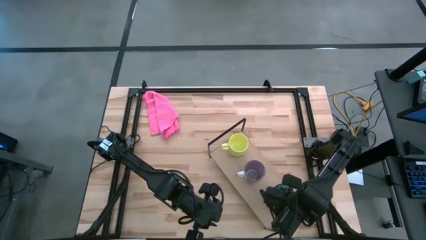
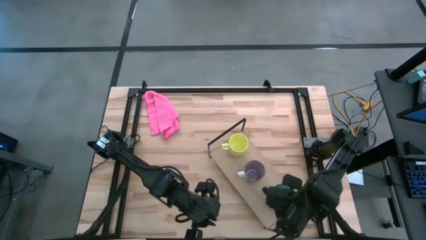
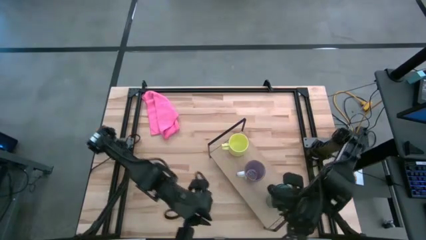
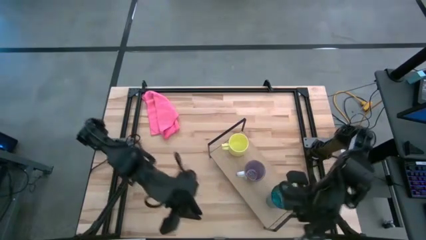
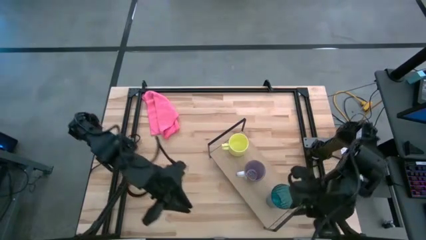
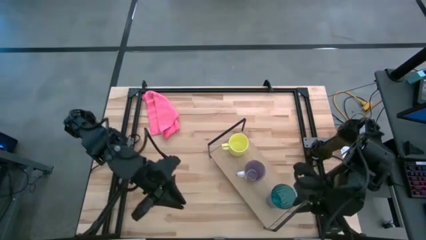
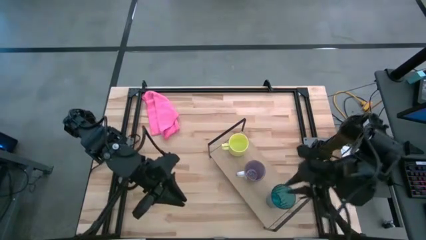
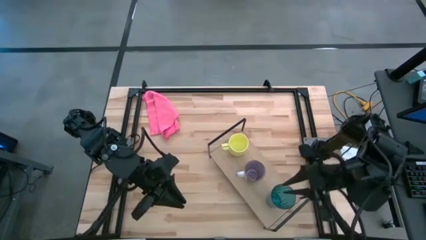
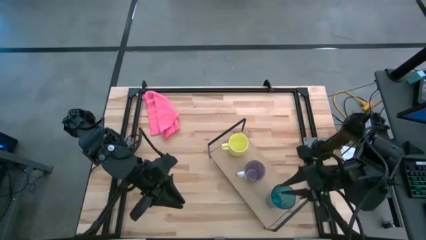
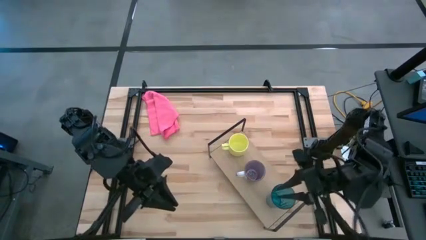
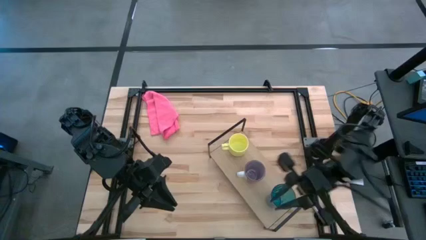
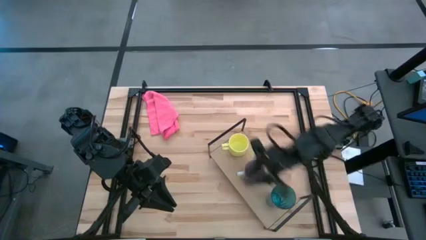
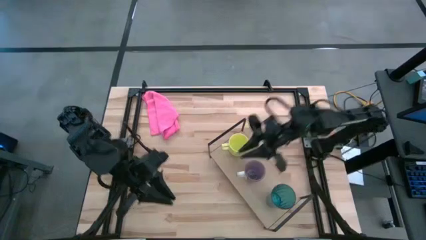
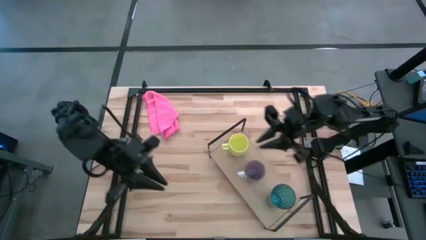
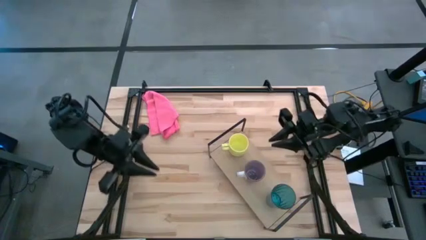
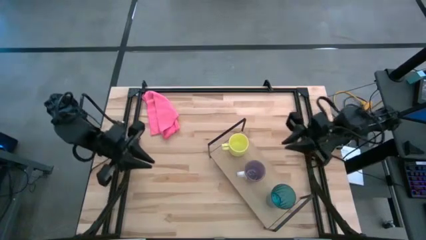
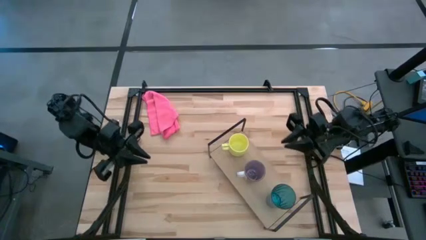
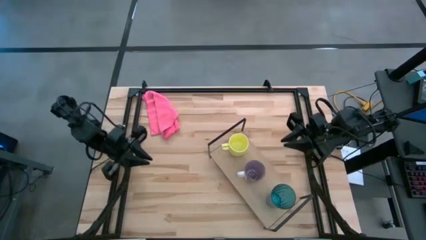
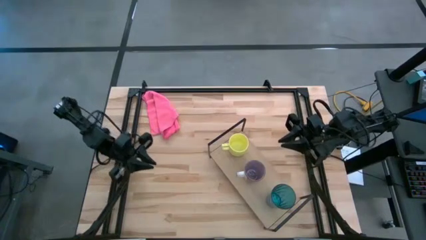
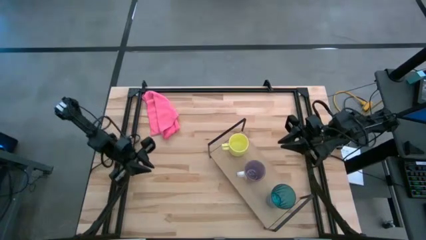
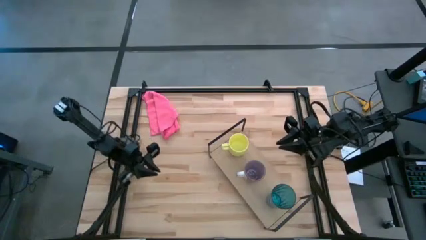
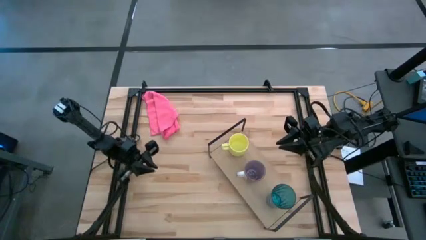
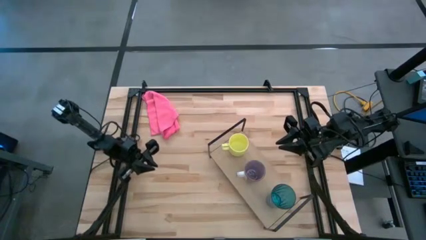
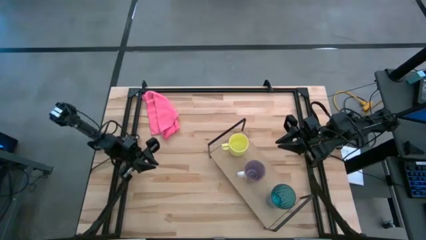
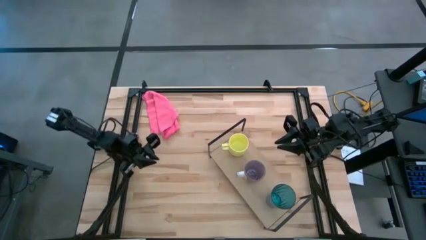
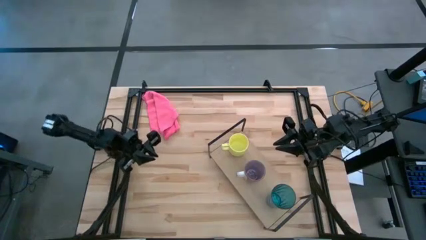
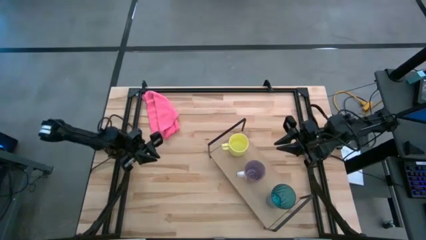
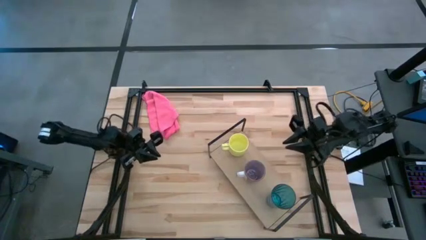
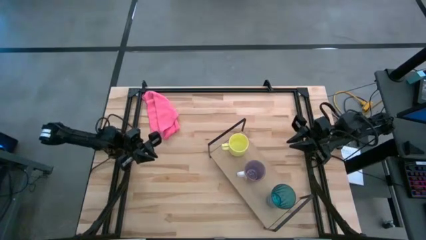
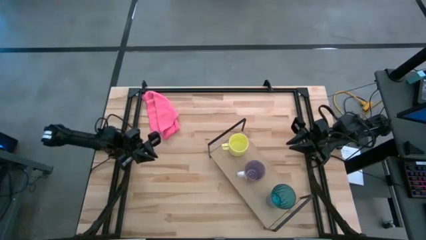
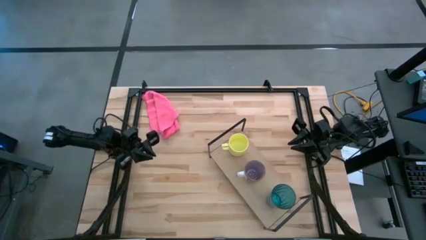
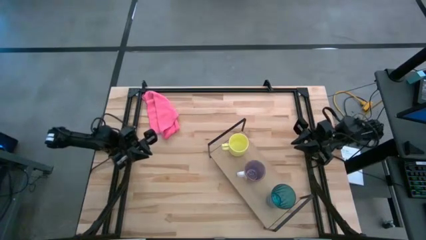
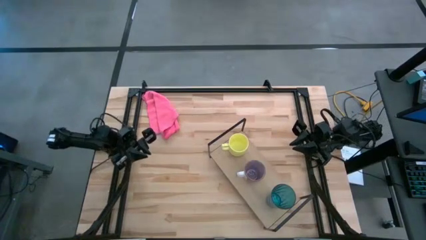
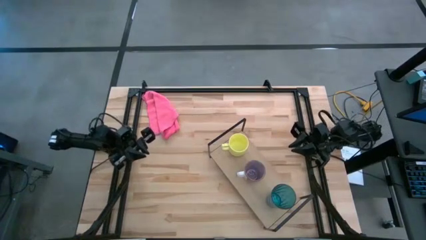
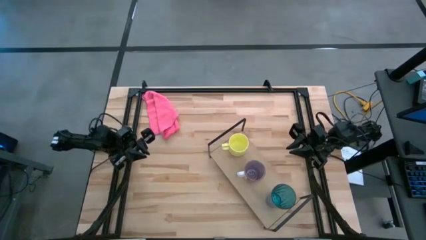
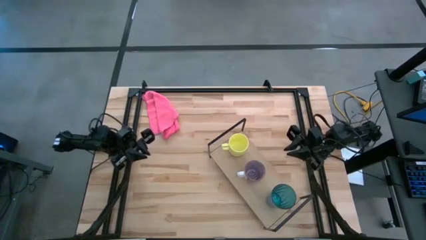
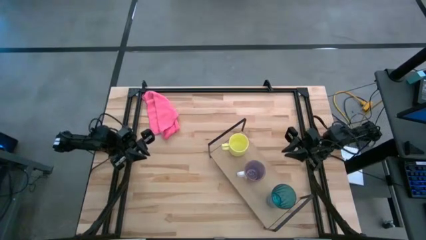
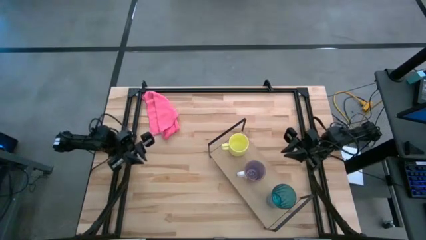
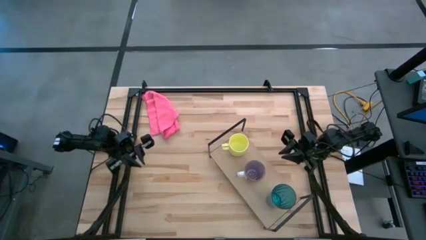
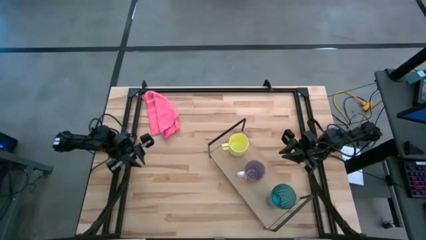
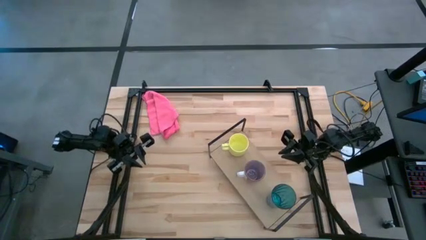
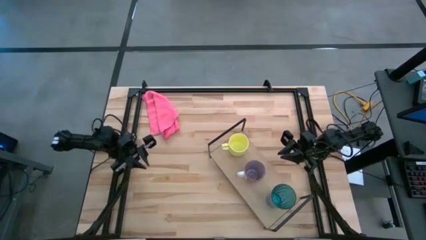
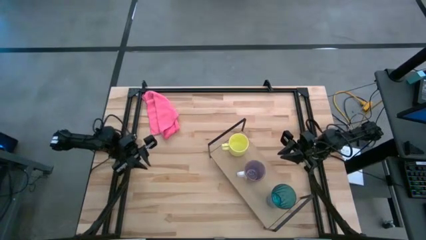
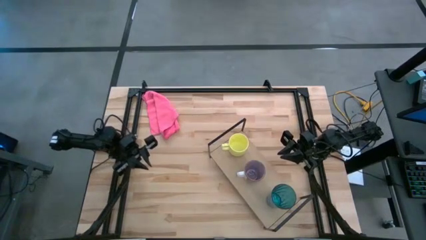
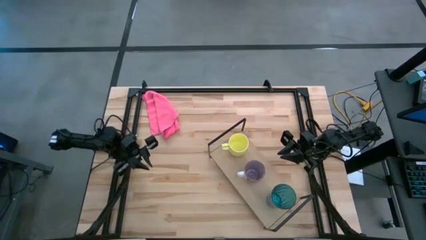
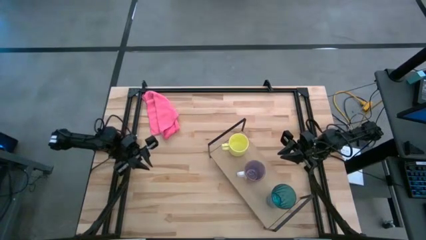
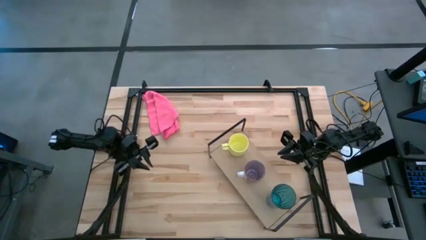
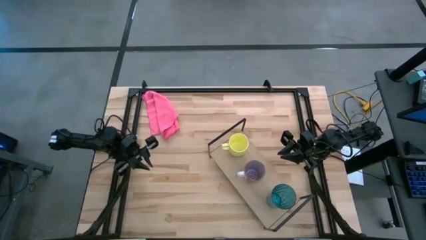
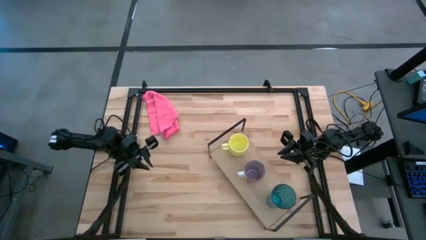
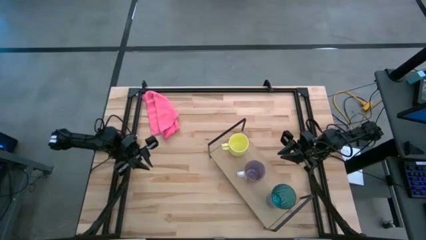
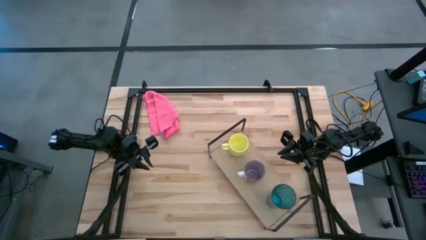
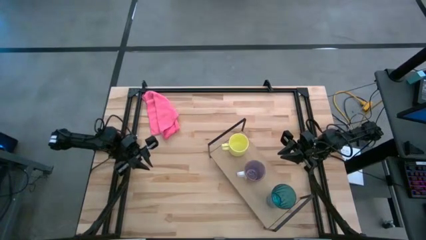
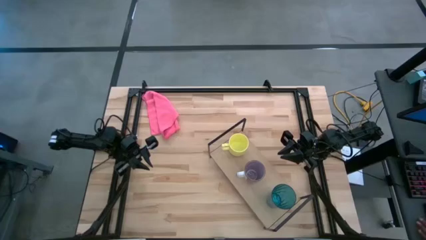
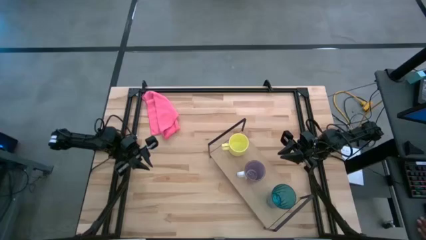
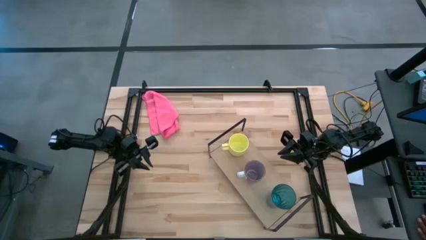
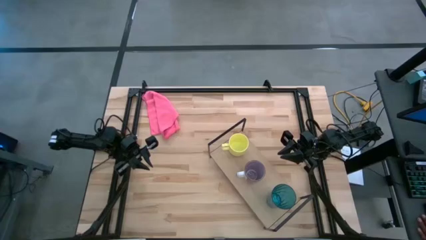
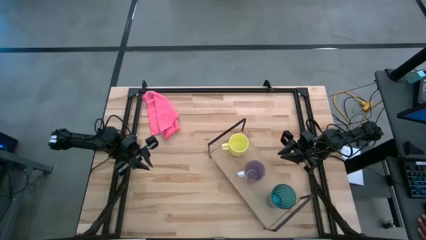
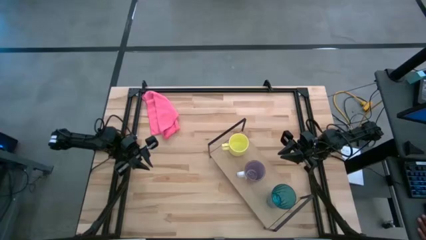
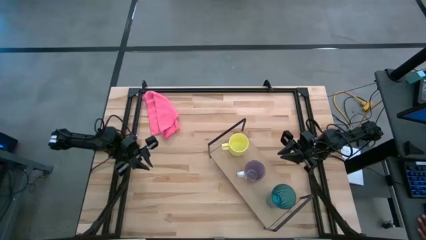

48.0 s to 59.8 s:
Task: Stack small to large cups/mugs on shelf
Return to Home Position

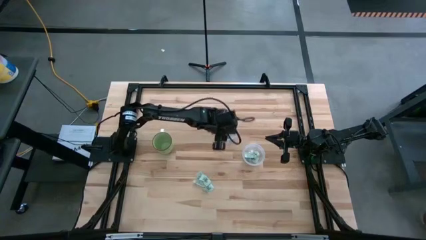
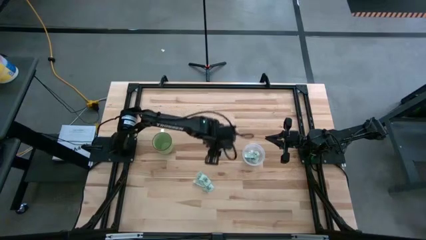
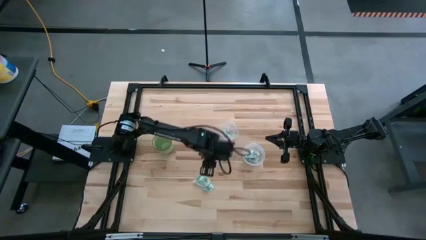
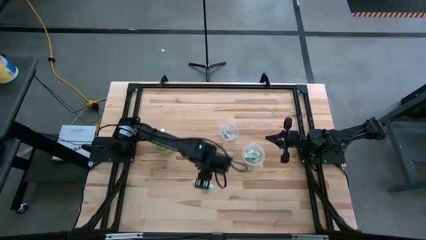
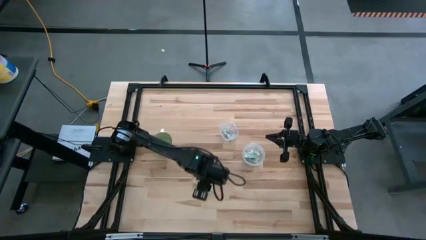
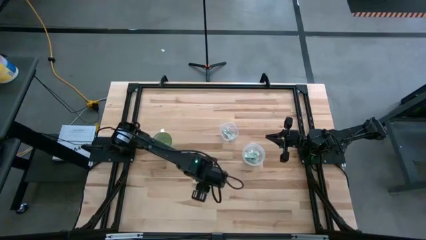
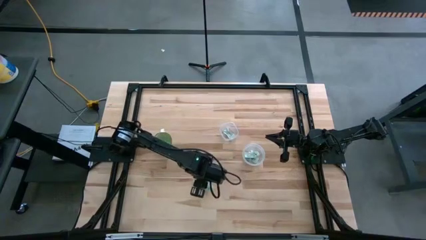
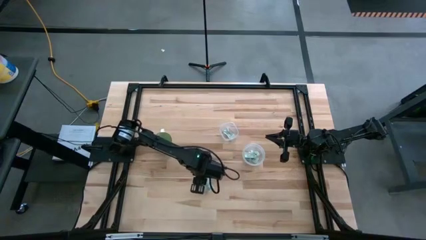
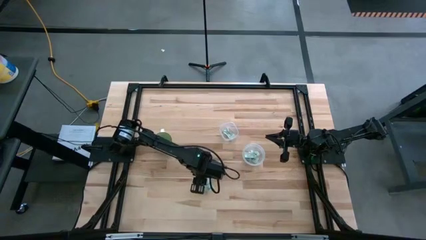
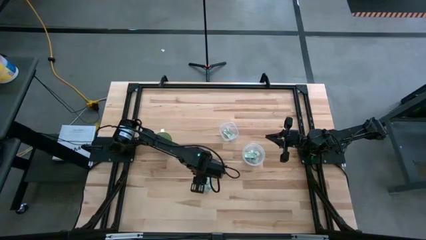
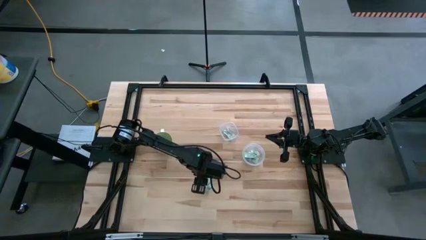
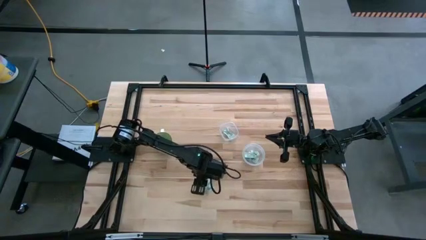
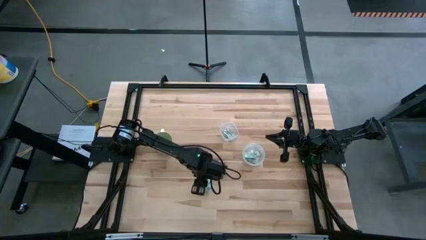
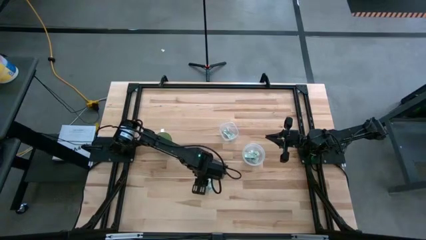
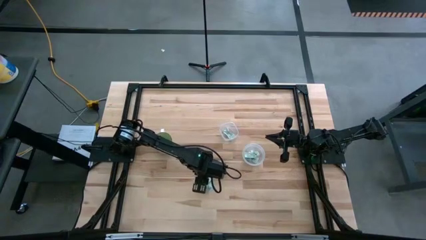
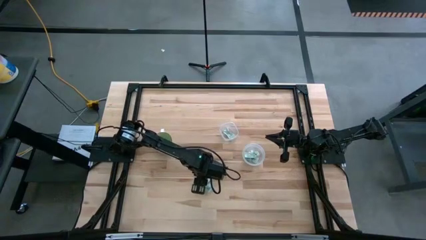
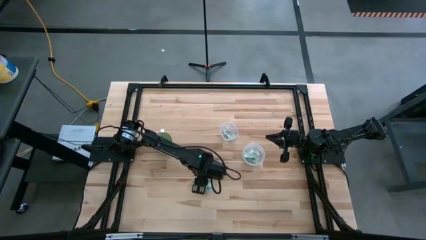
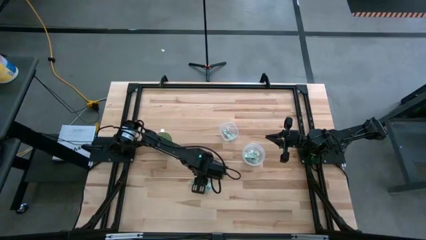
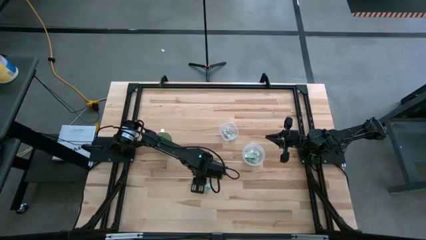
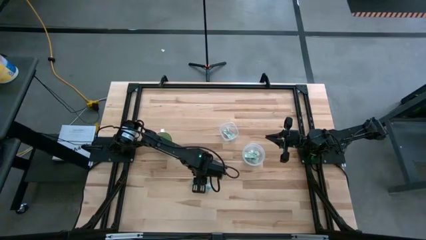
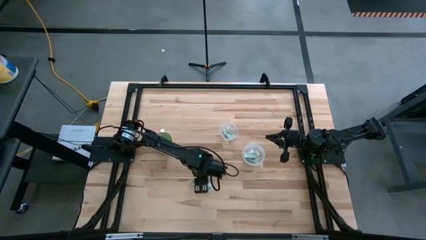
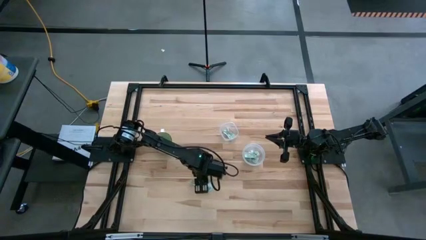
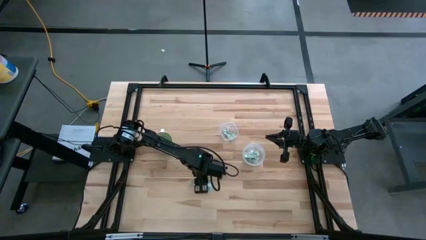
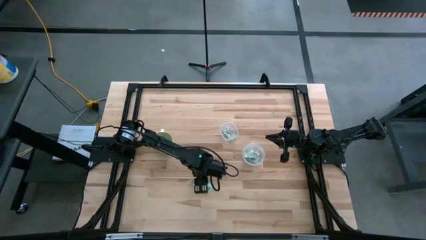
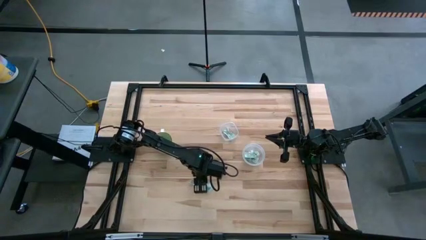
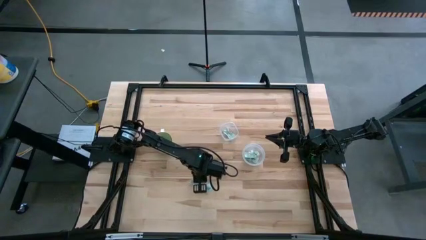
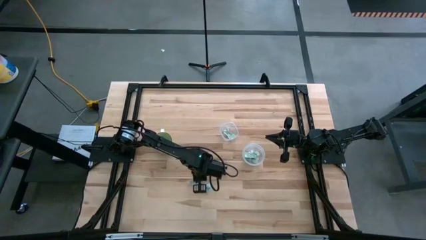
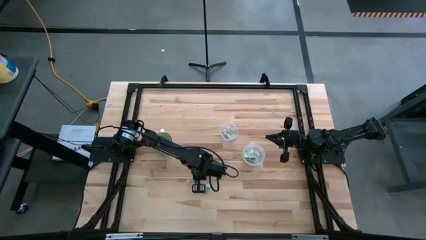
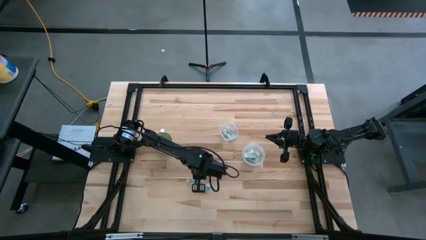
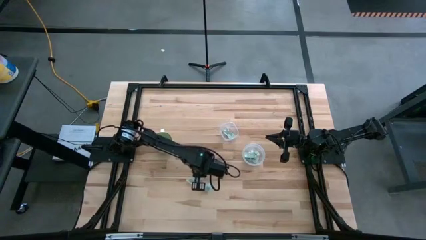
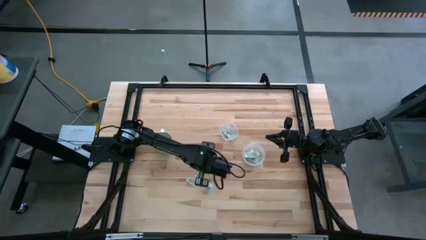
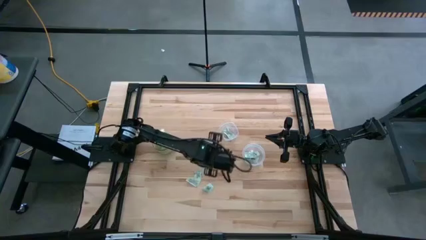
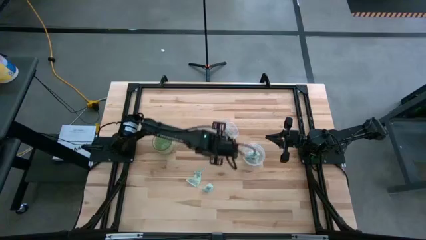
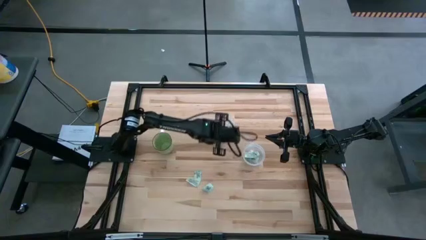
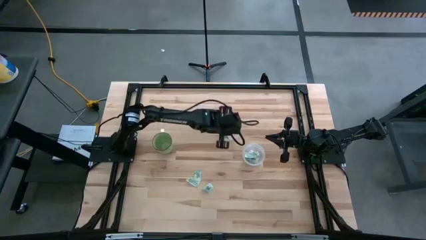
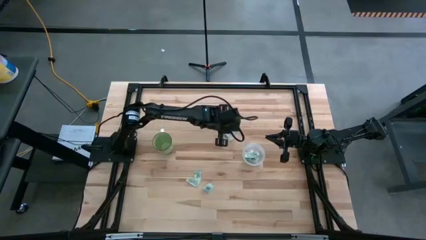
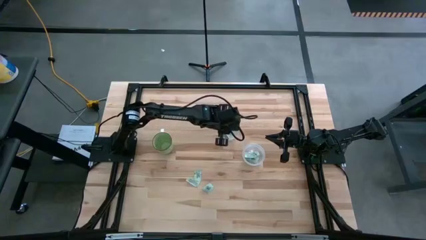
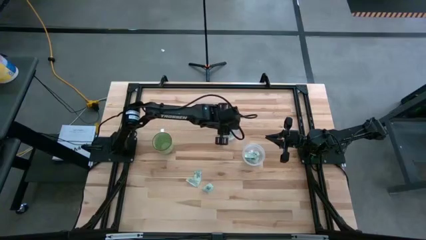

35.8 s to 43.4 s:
Task: Pick and place Stevia / Truvia into bins
Put the stevia packet into the top transparent container
